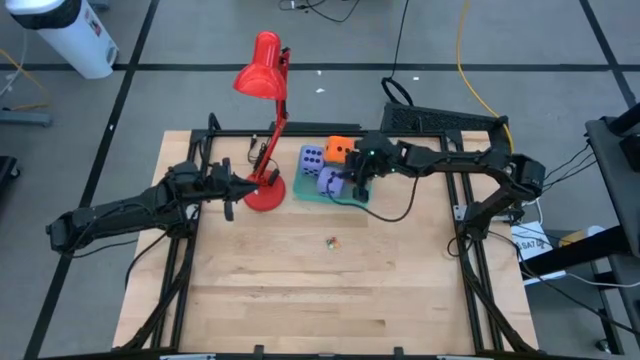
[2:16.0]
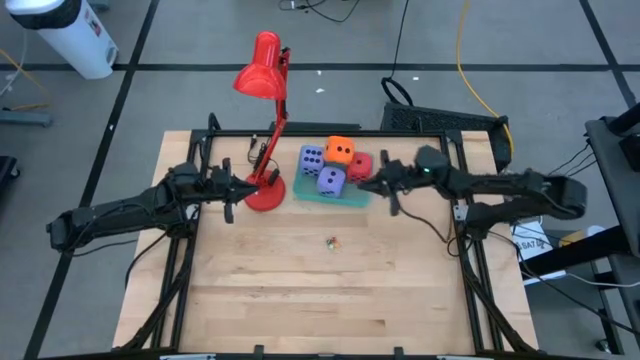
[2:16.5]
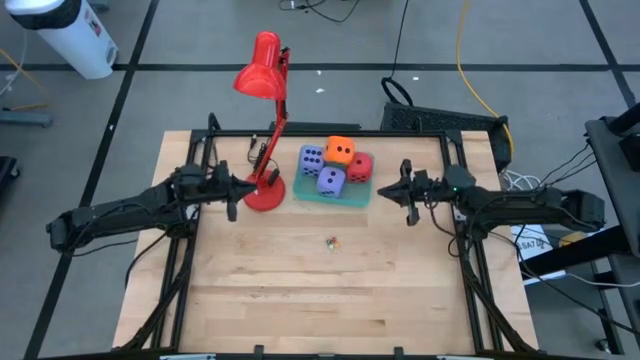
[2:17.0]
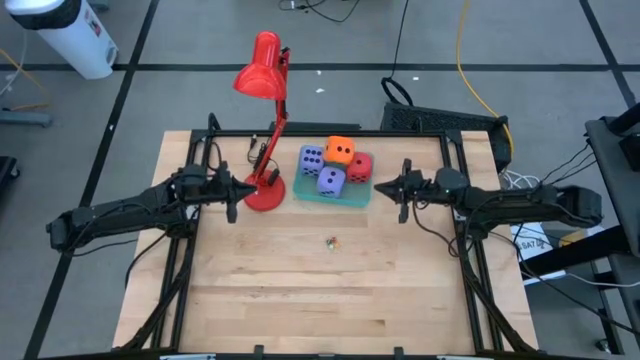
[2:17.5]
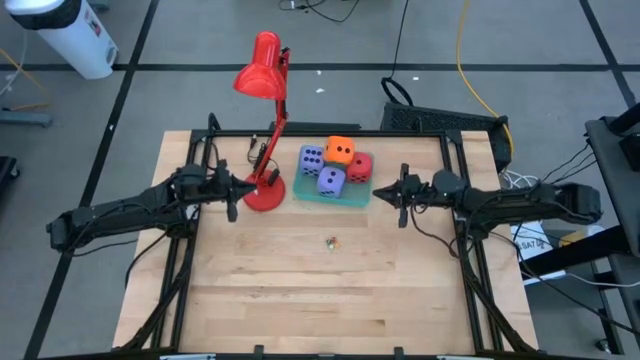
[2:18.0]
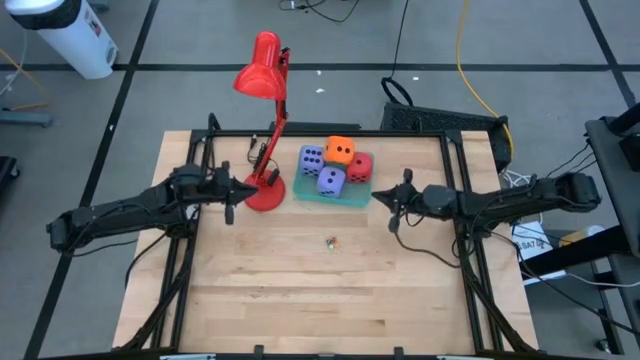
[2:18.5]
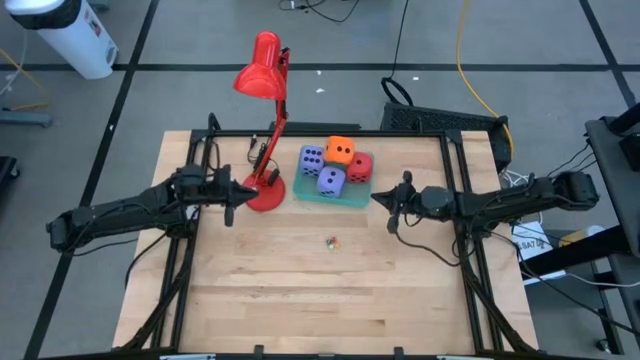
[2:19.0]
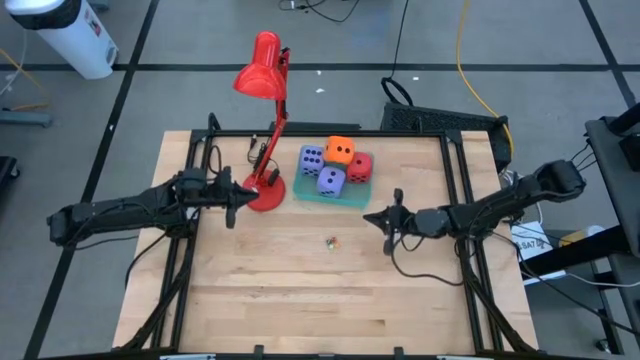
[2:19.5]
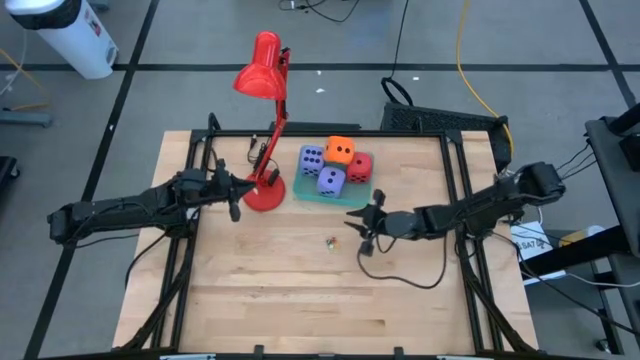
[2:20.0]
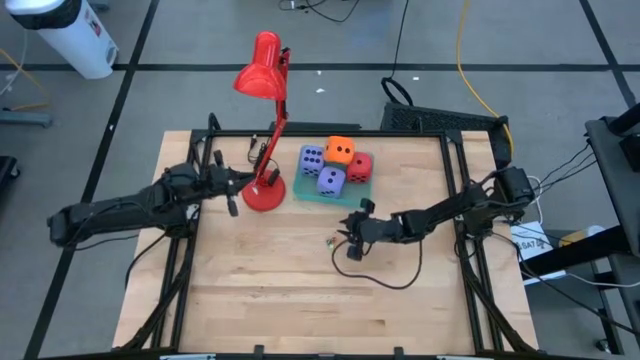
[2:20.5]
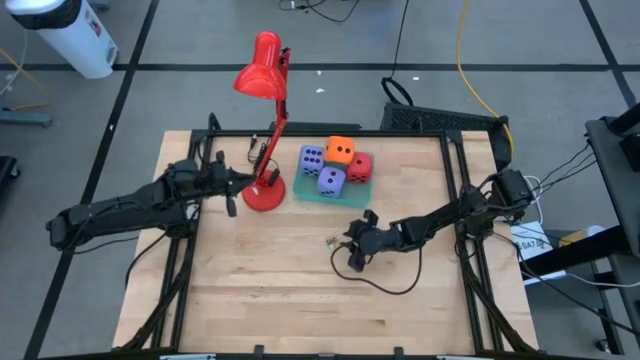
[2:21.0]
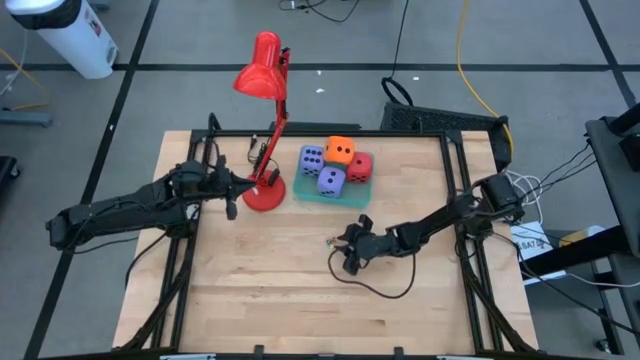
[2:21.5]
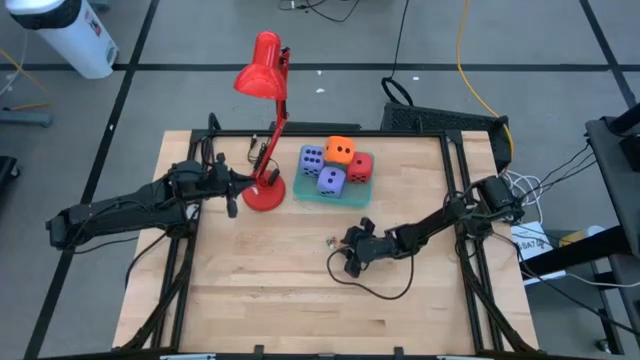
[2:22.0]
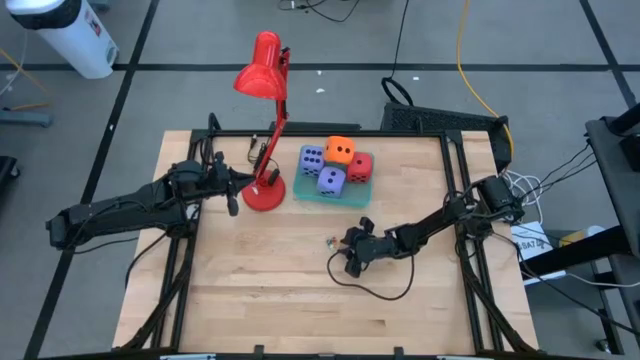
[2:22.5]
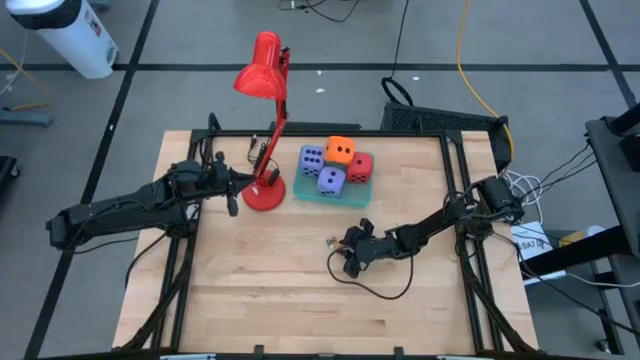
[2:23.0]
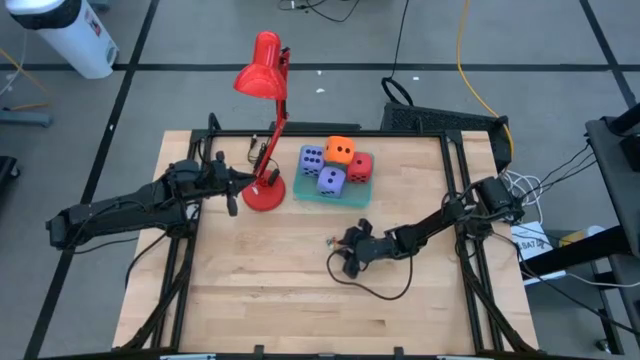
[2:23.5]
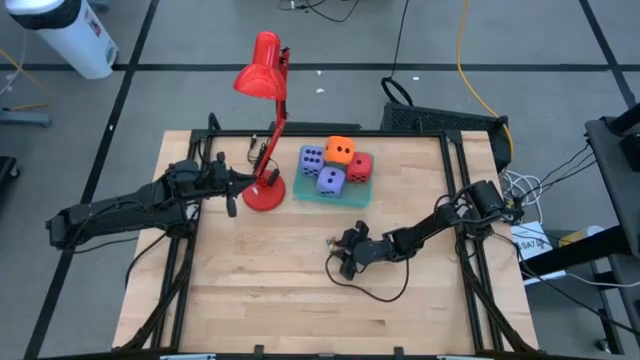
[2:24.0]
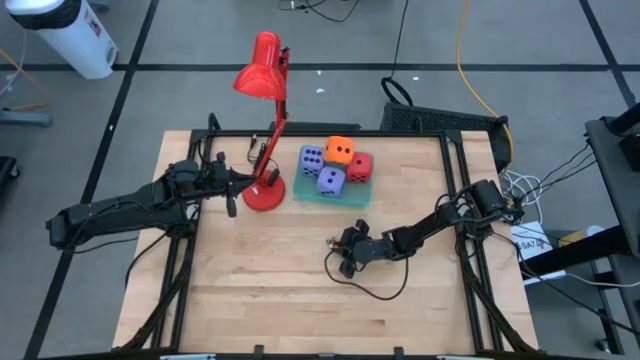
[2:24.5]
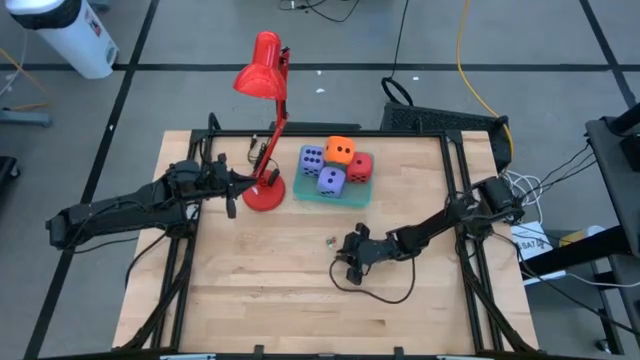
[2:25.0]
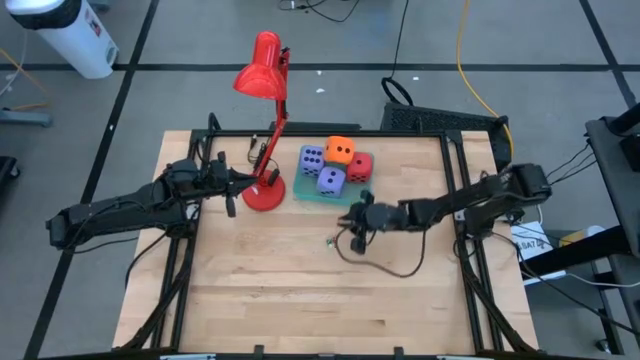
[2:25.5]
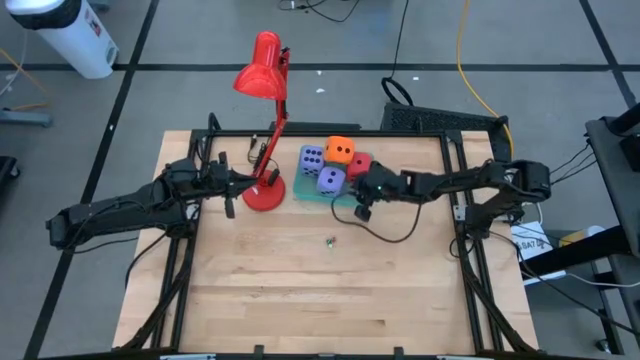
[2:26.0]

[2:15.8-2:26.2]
Task: Pick & Place Dice
Put the small yellow die into the blue bin

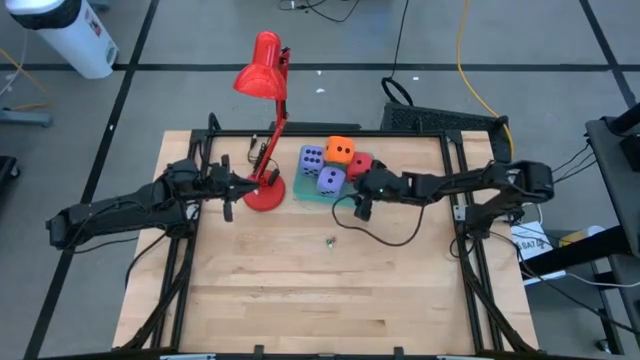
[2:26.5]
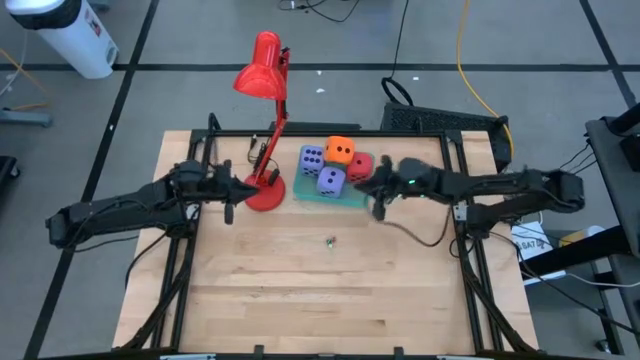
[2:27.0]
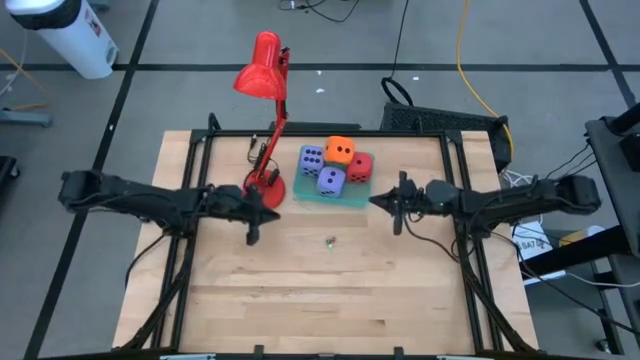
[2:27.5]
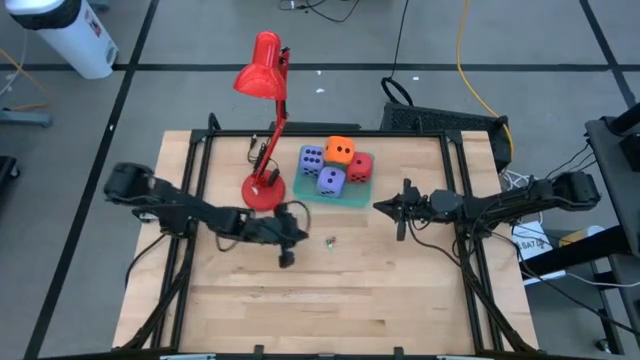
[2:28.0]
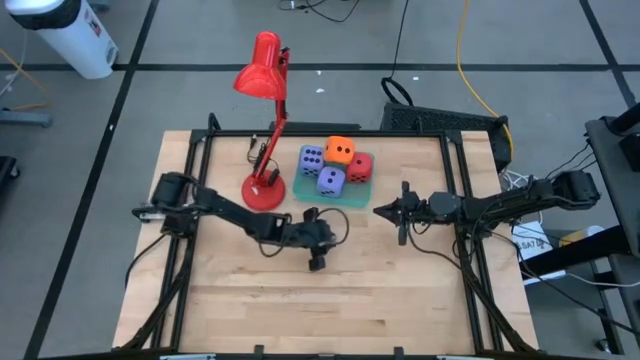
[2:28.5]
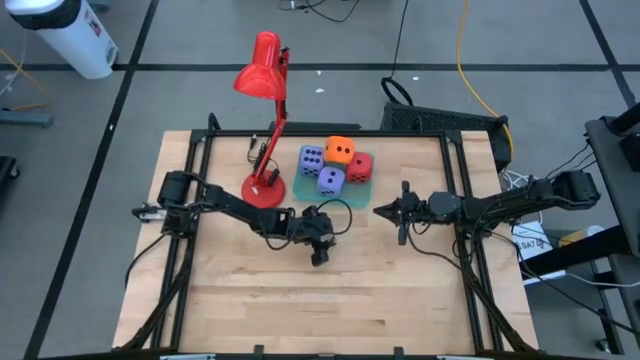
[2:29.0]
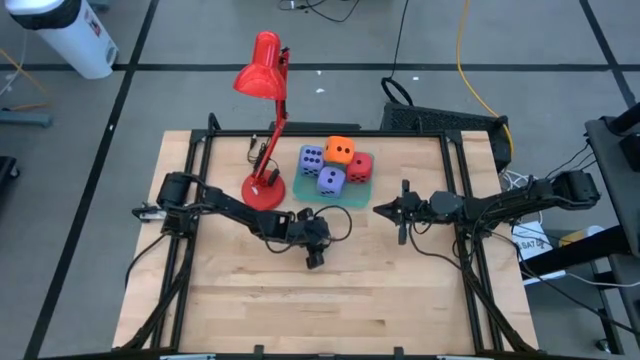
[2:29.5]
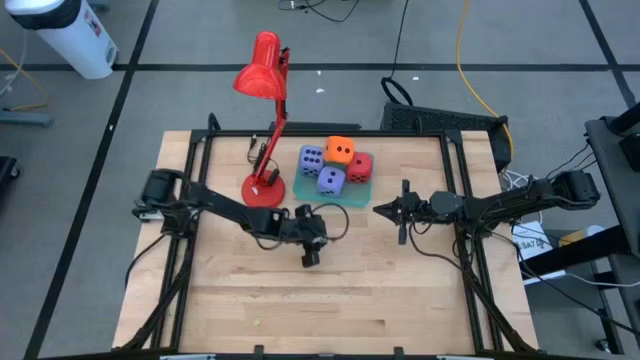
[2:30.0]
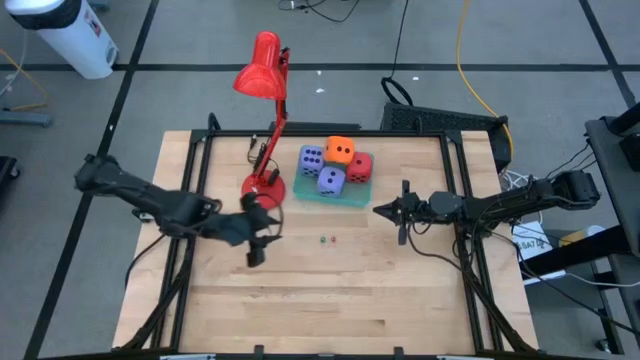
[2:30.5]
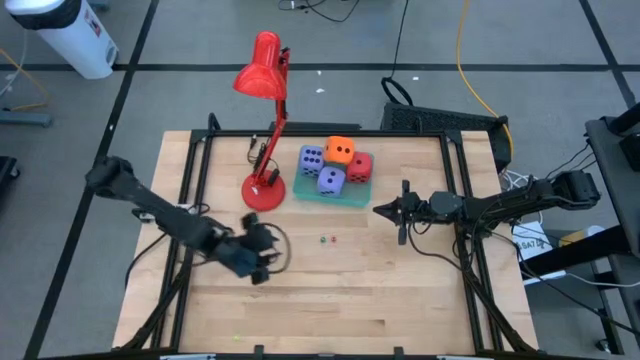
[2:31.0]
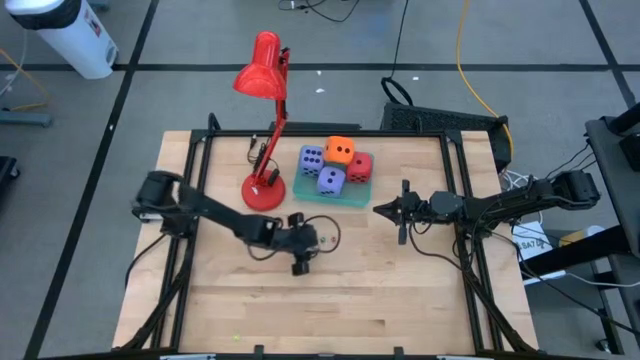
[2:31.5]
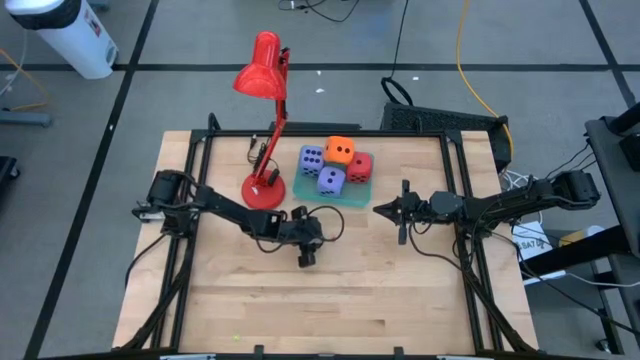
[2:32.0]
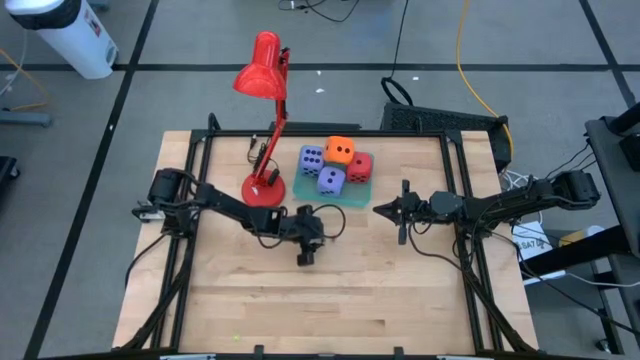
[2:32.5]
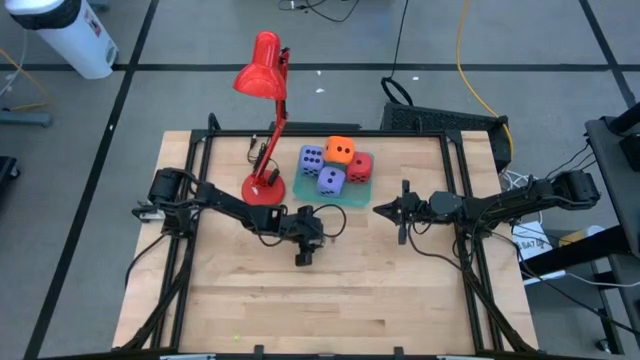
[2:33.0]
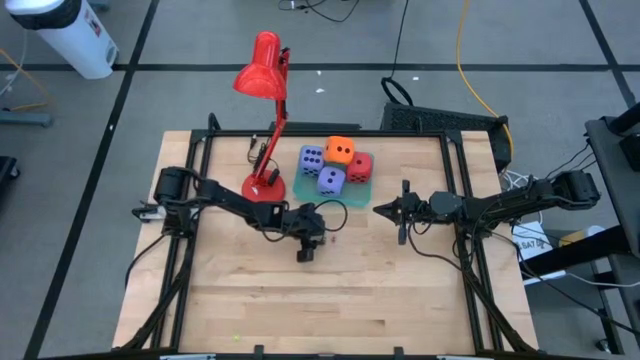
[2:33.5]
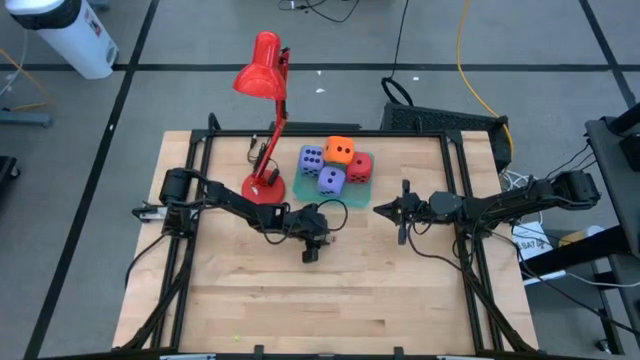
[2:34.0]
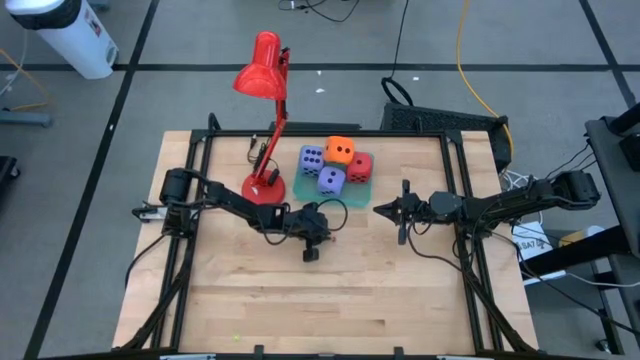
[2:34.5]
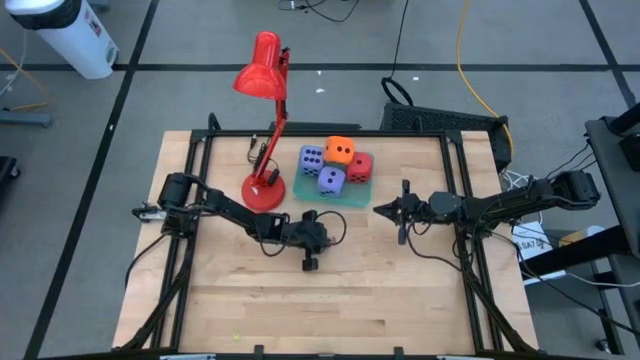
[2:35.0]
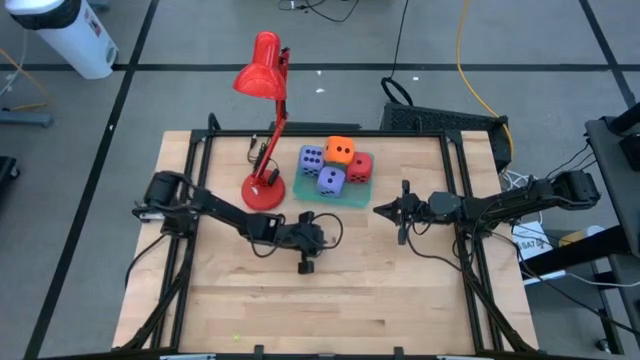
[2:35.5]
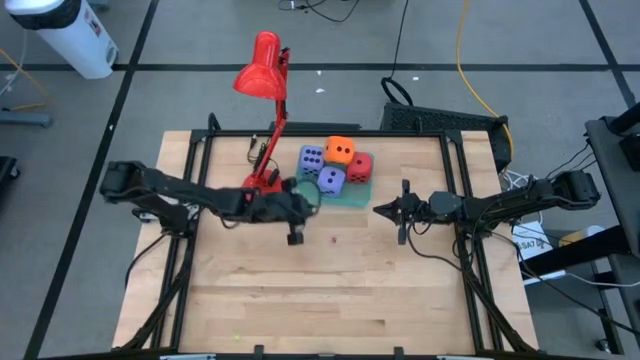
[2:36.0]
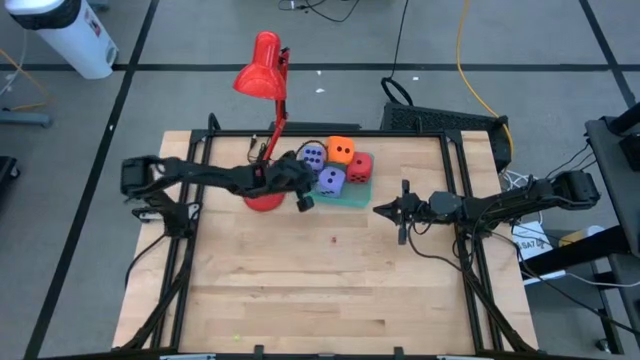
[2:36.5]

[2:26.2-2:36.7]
Put the small dark green die into the blue bin
